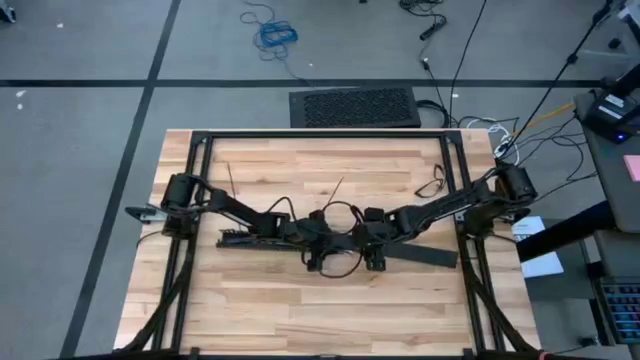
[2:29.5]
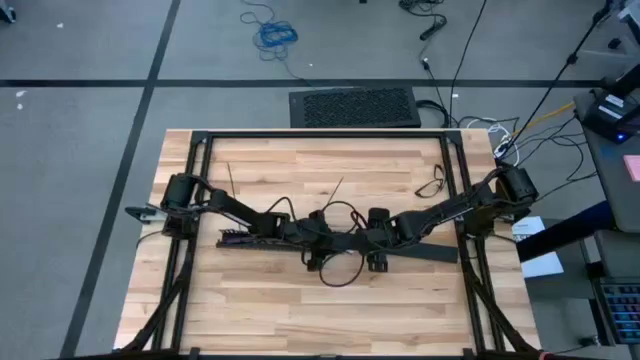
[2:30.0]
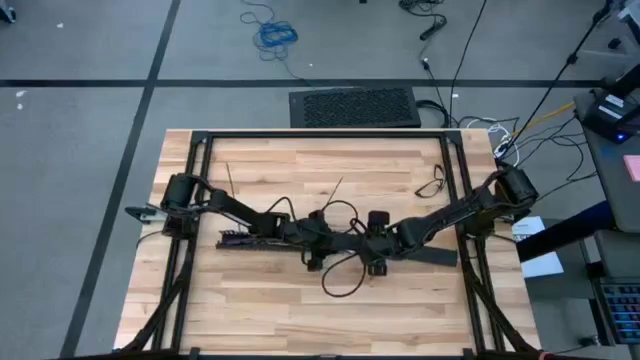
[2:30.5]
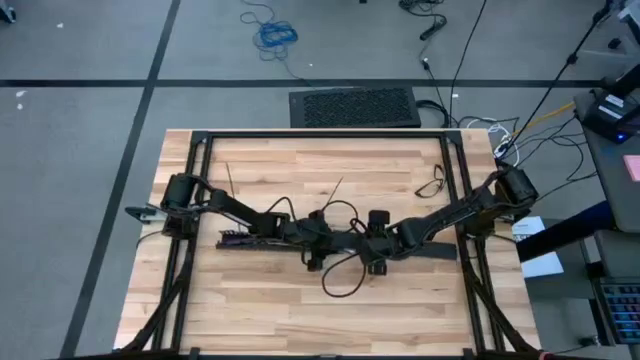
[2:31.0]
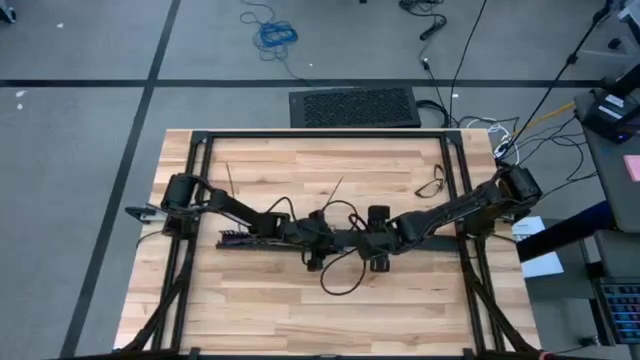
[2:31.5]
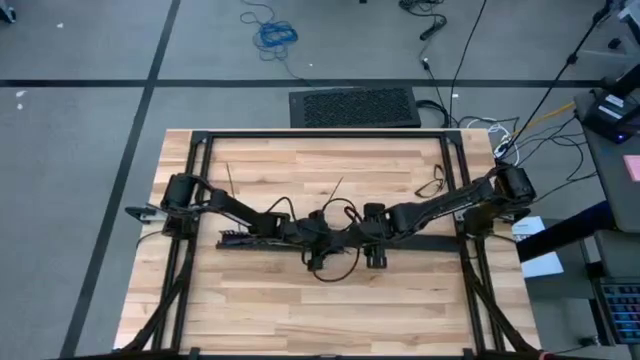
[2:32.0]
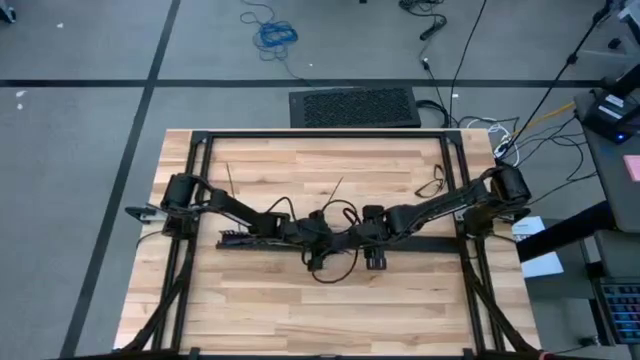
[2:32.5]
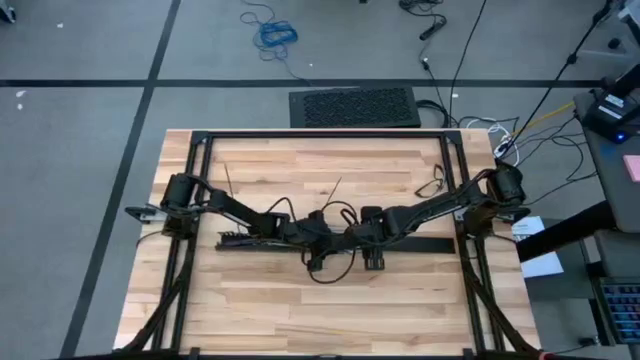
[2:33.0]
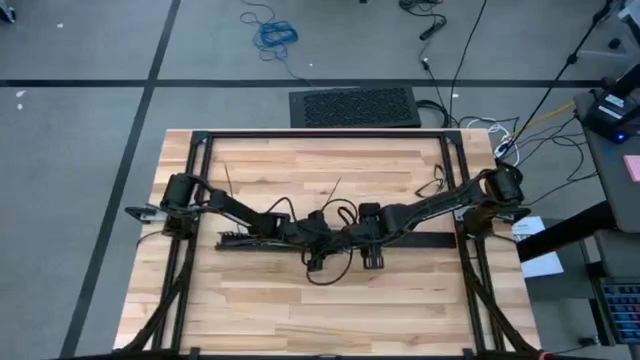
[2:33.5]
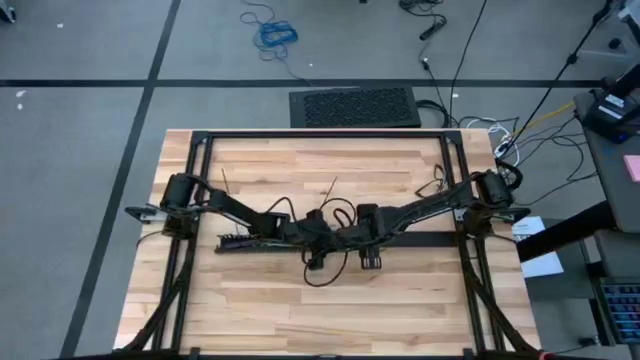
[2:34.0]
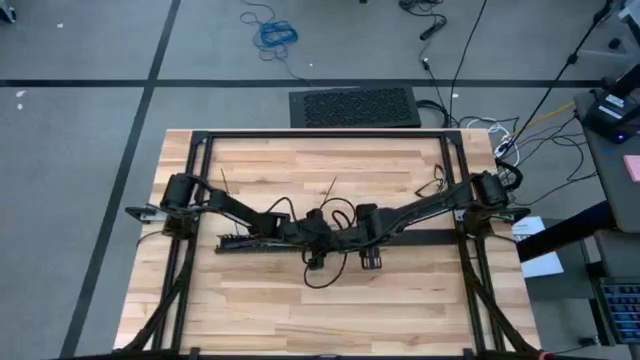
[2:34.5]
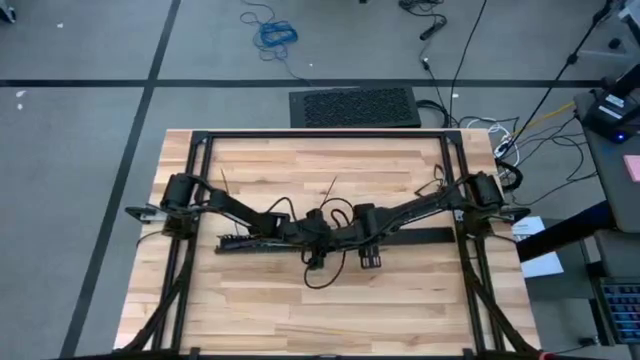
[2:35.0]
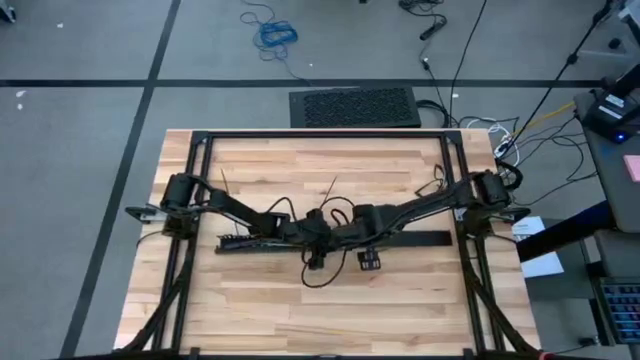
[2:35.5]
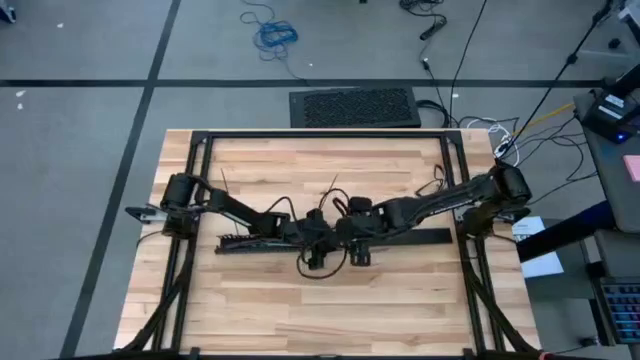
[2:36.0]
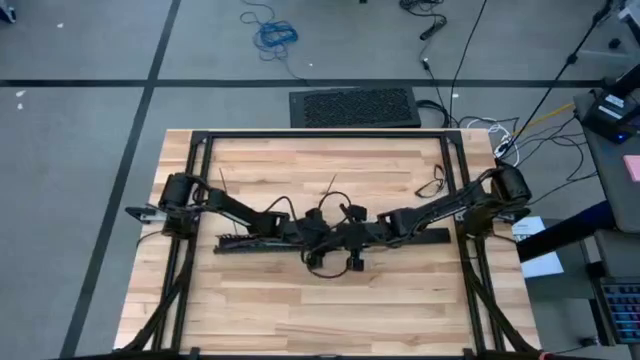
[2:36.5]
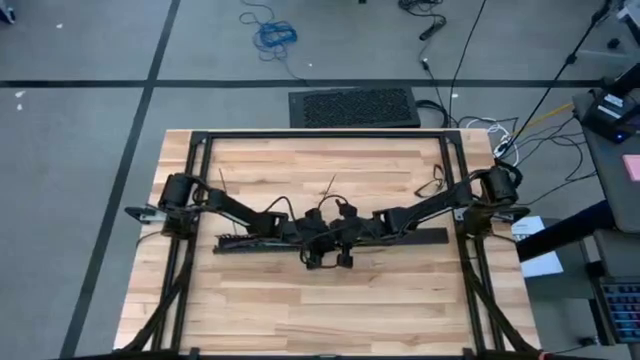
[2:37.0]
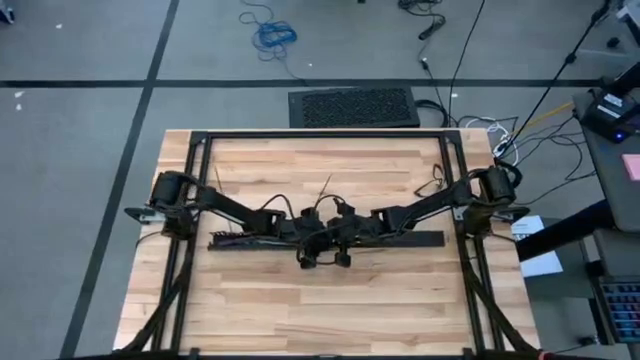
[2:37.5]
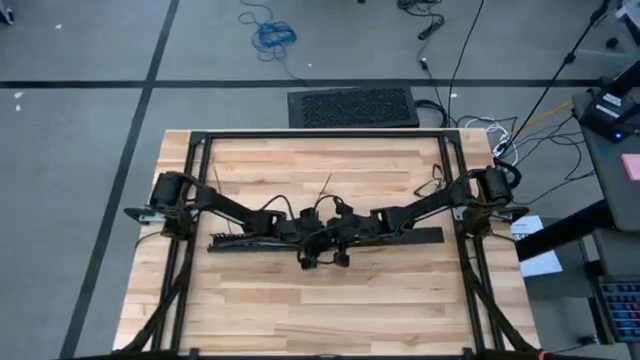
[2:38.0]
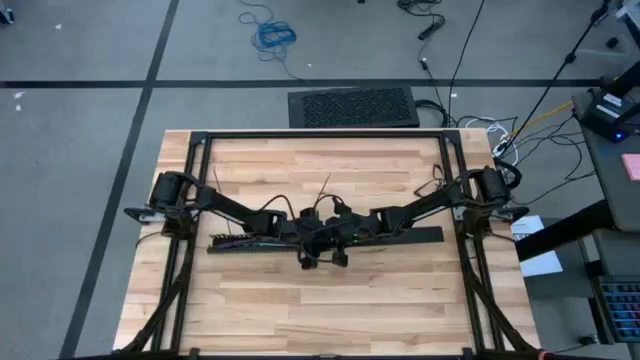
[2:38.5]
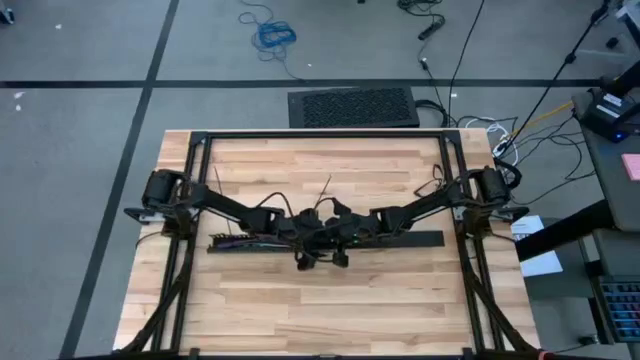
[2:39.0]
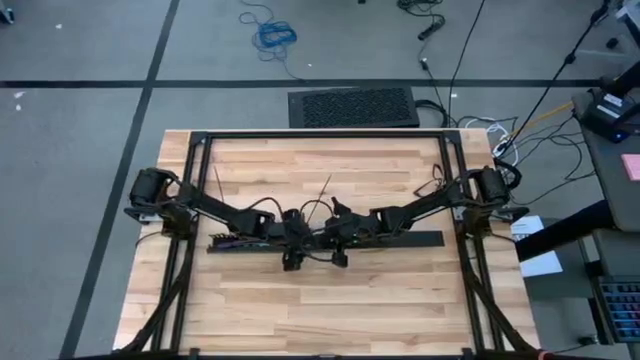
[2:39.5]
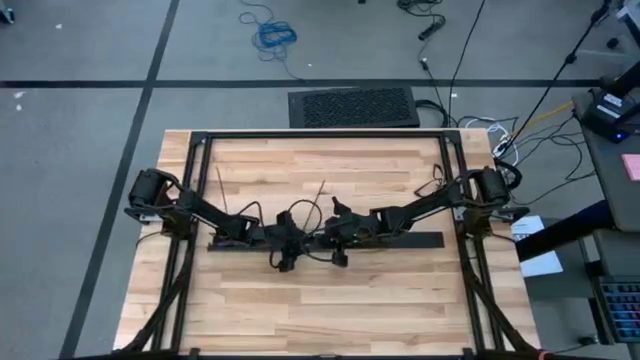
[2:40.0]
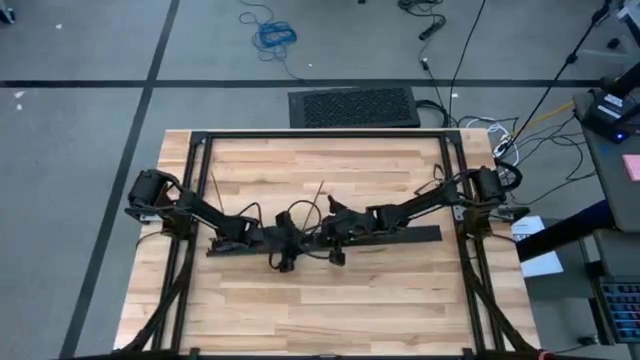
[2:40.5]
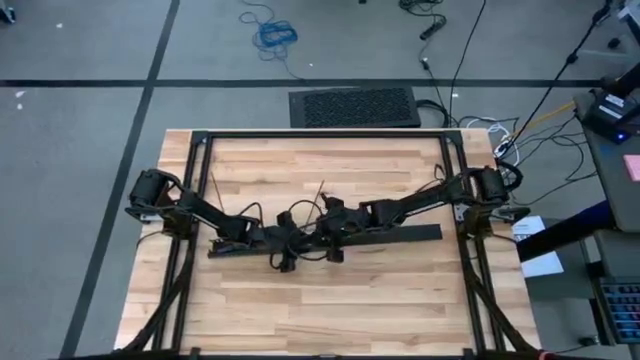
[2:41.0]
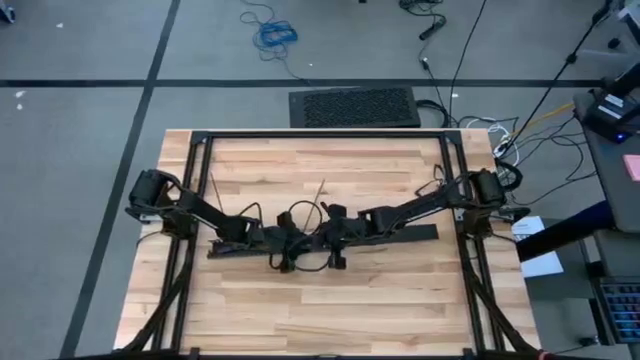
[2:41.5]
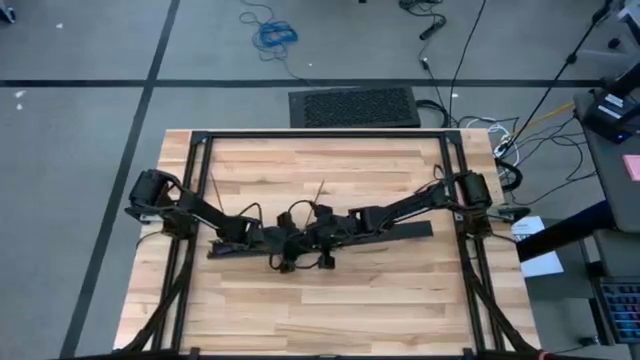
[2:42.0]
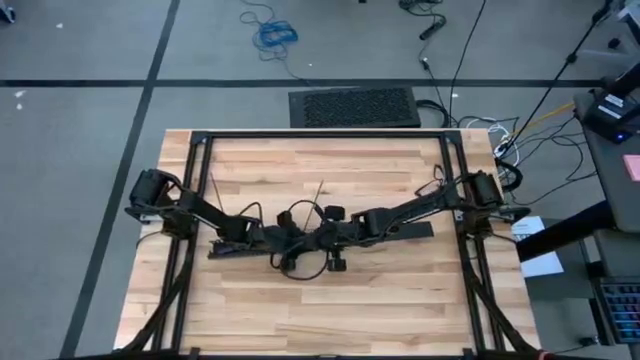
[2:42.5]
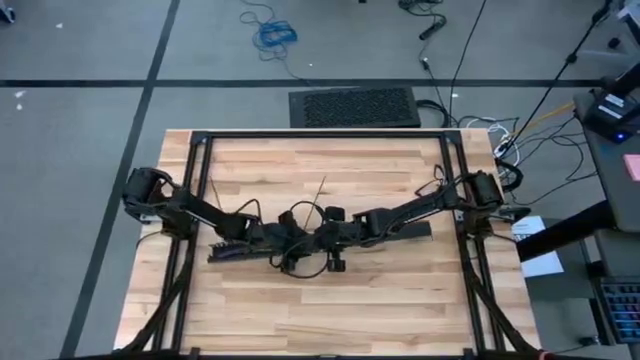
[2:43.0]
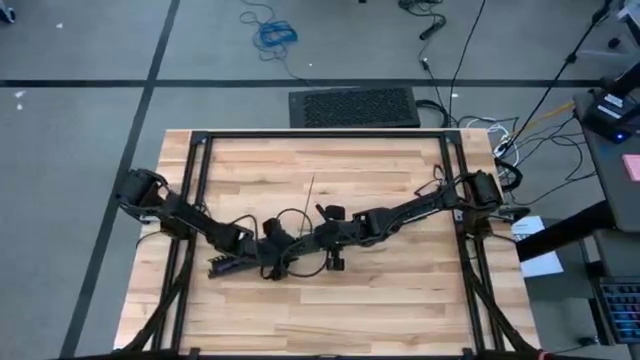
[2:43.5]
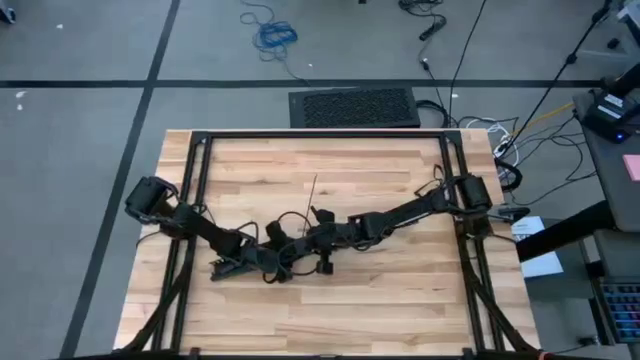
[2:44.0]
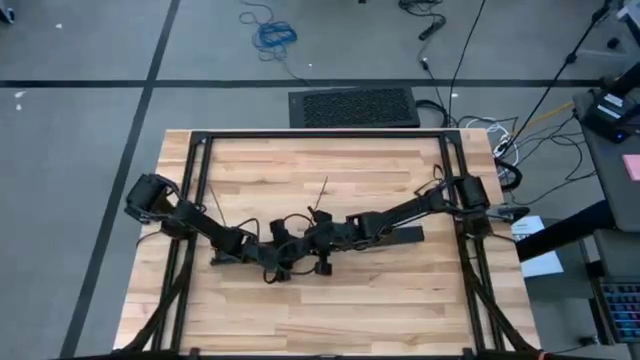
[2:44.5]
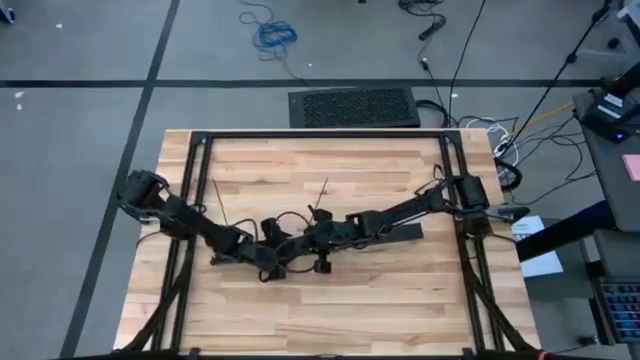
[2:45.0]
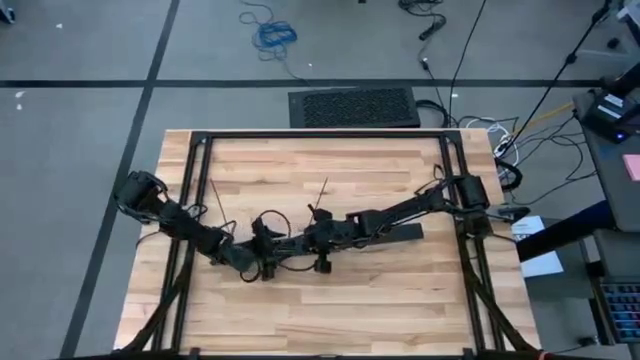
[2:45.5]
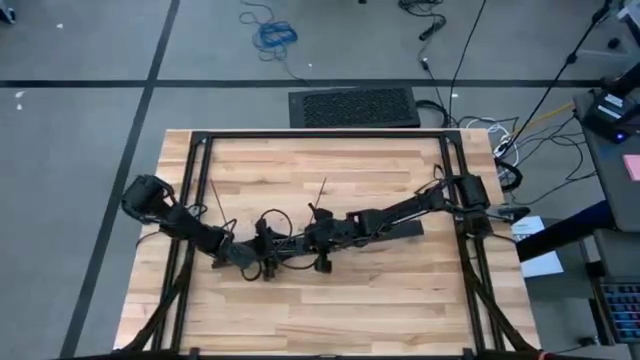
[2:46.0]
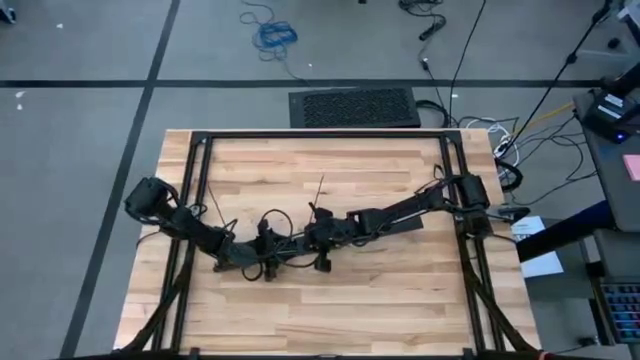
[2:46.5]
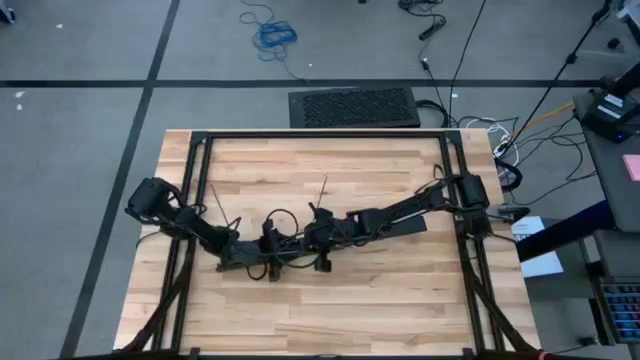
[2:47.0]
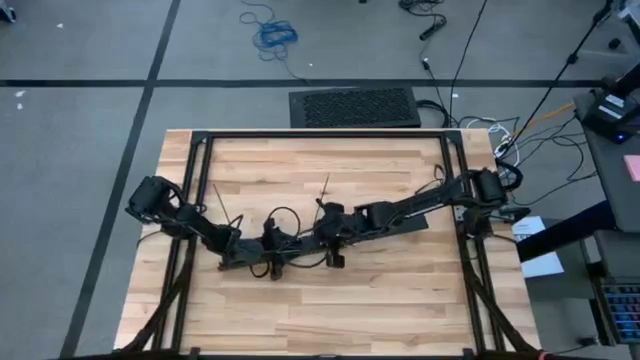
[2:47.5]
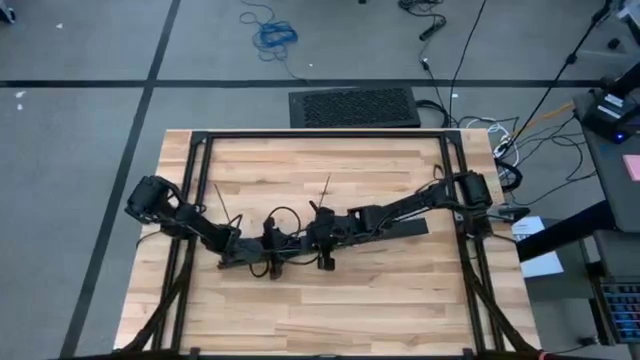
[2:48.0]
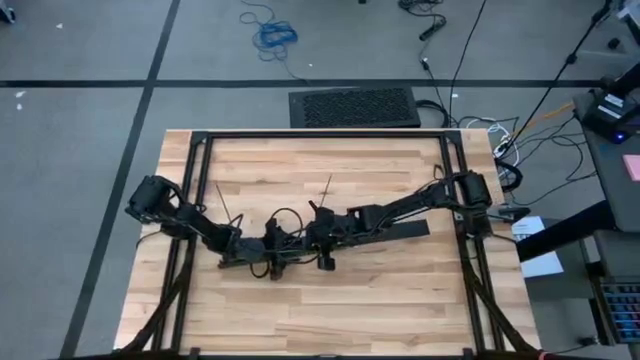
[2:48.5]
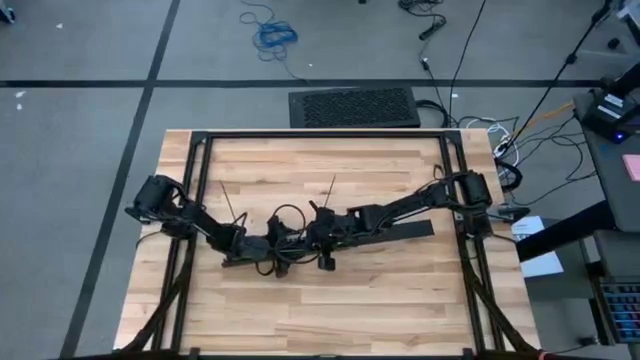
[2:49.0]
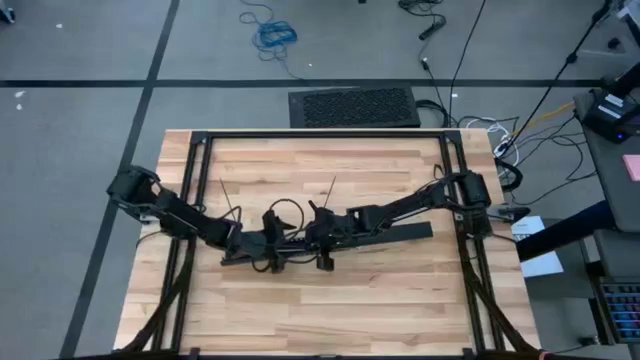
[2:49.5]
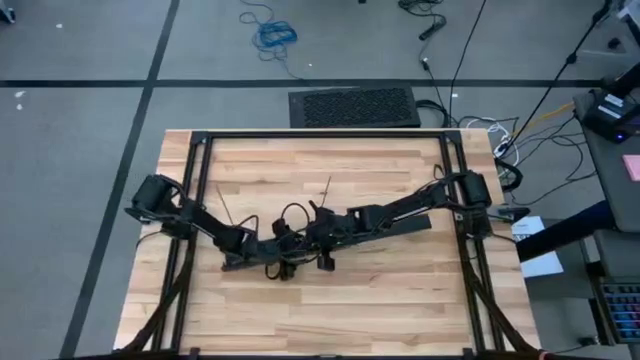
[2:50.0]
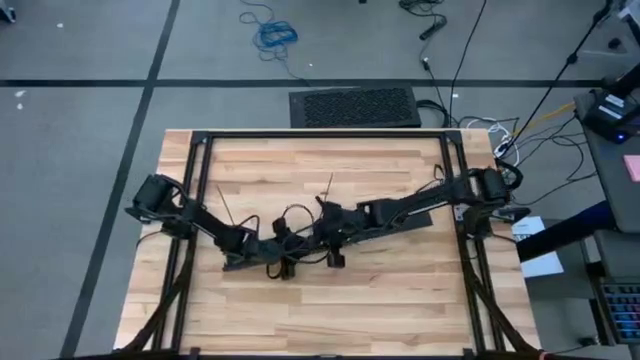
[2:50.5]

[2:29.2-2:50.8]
Task: Ziptie cables
Close the black cable duct
